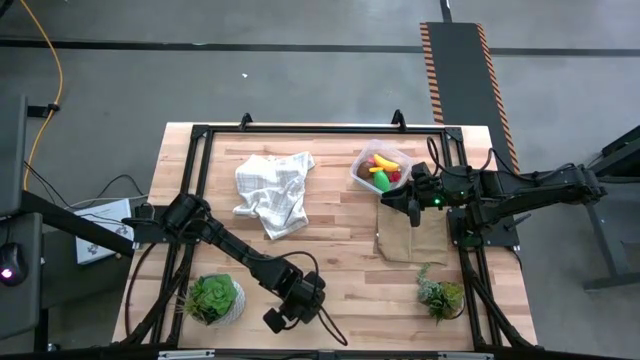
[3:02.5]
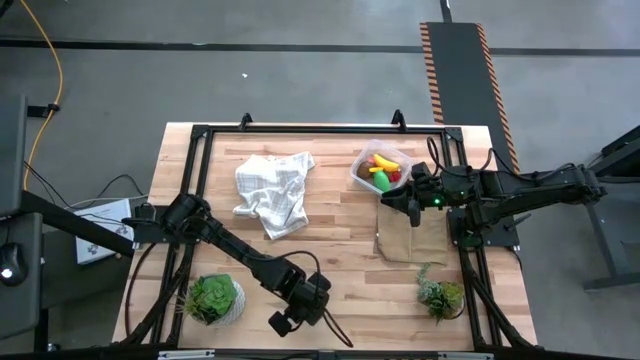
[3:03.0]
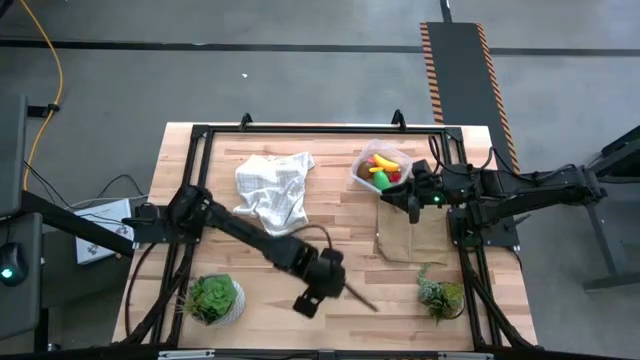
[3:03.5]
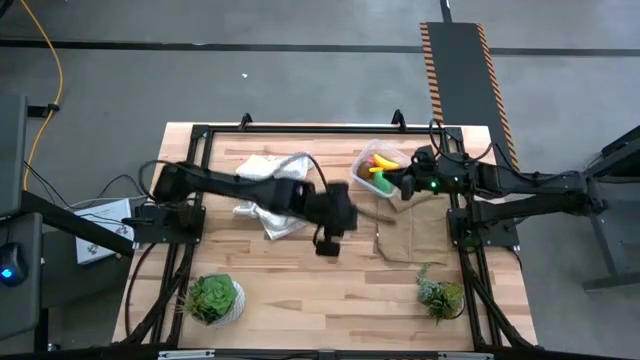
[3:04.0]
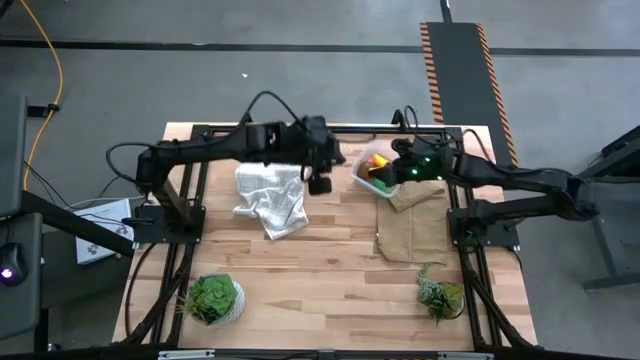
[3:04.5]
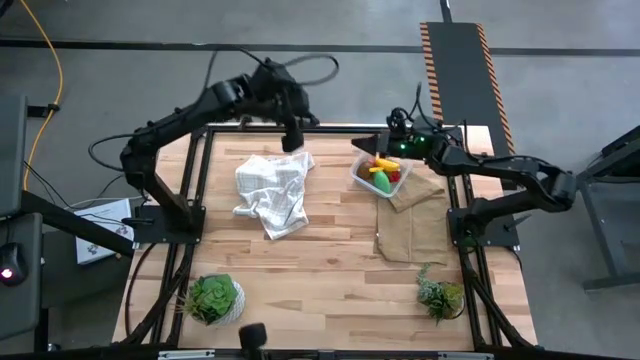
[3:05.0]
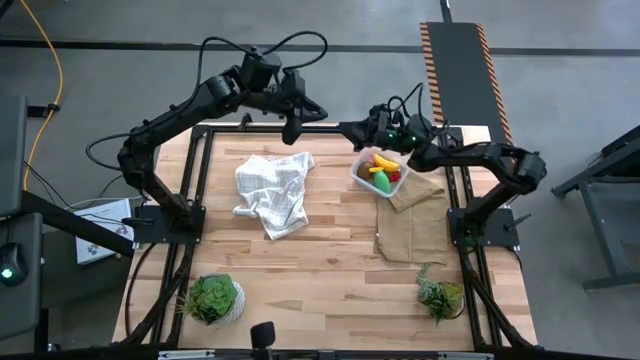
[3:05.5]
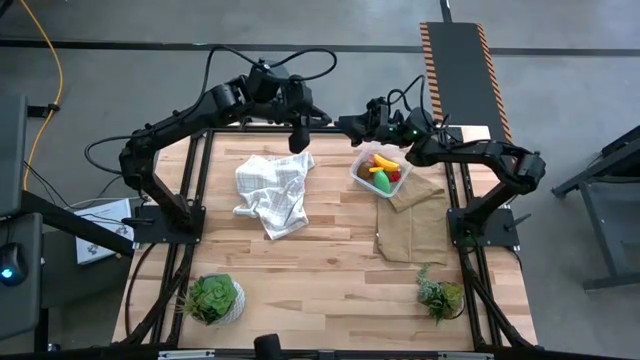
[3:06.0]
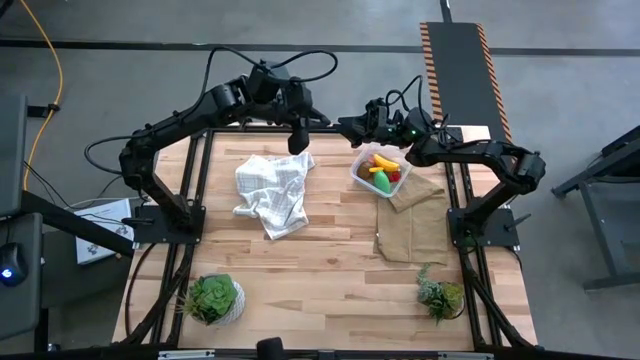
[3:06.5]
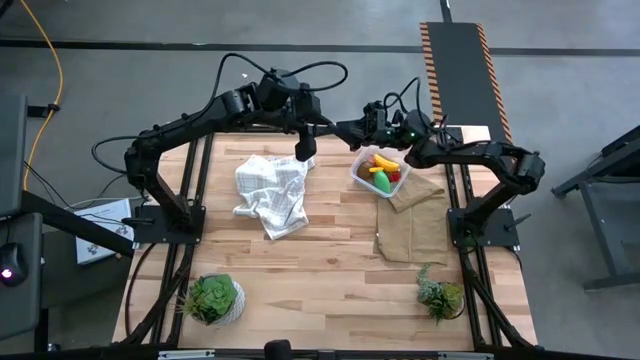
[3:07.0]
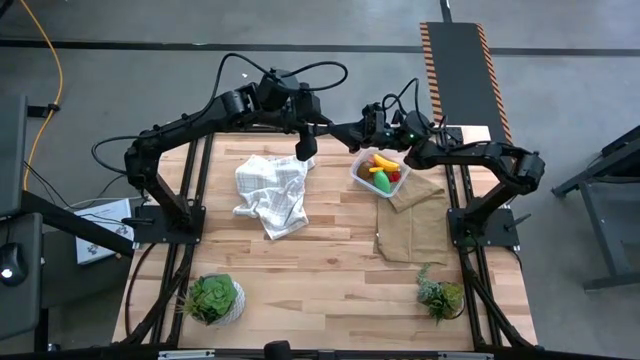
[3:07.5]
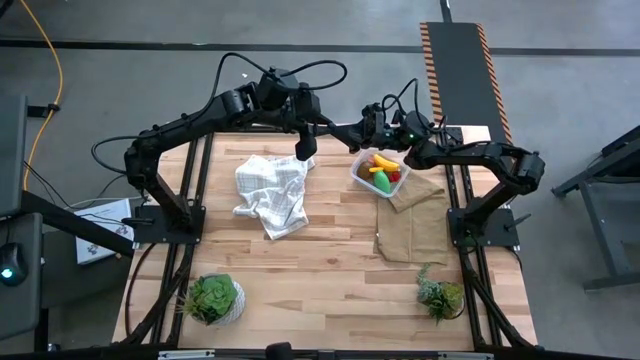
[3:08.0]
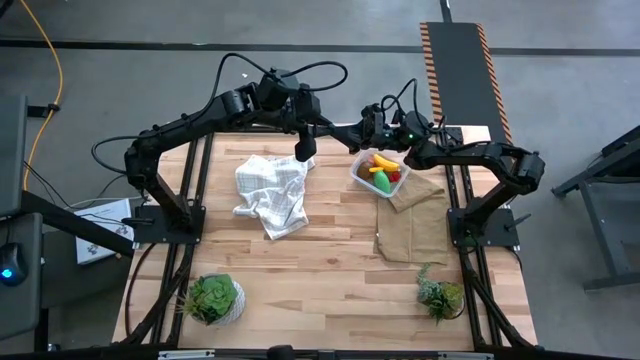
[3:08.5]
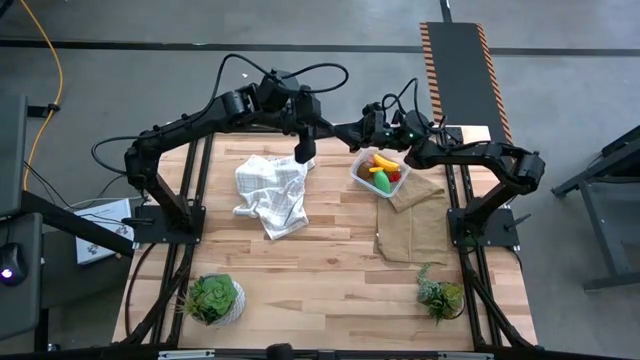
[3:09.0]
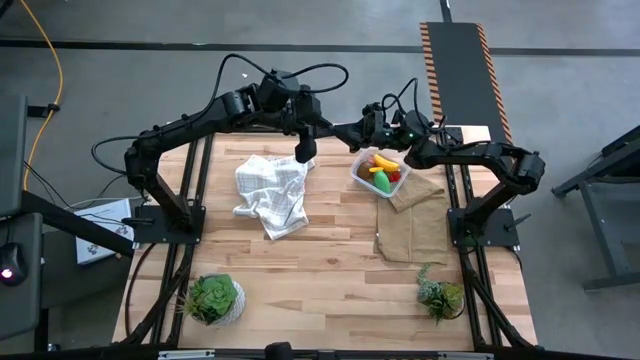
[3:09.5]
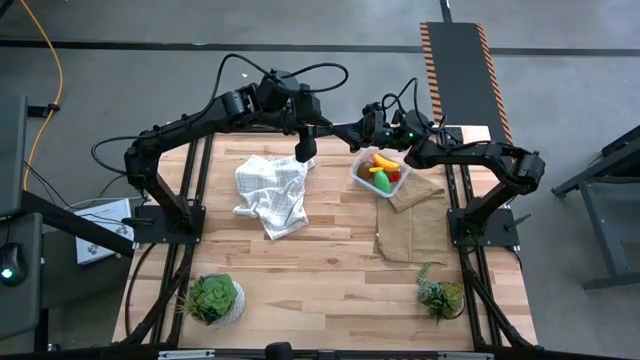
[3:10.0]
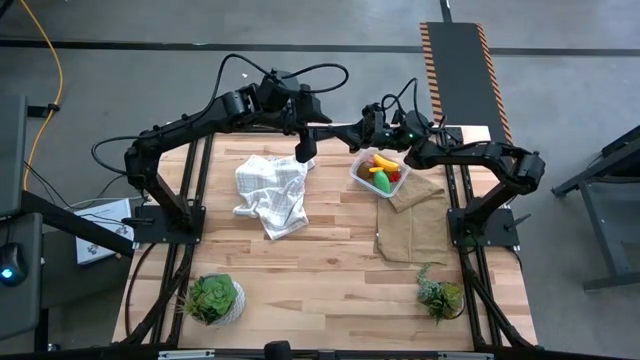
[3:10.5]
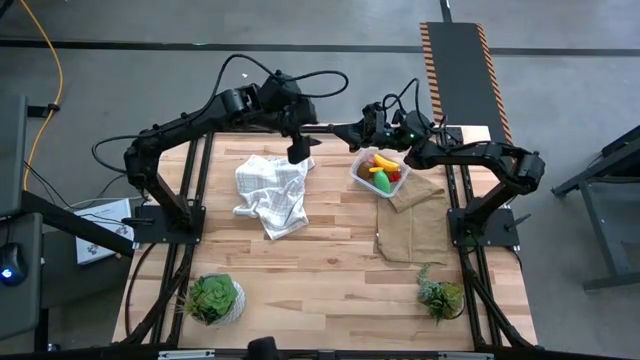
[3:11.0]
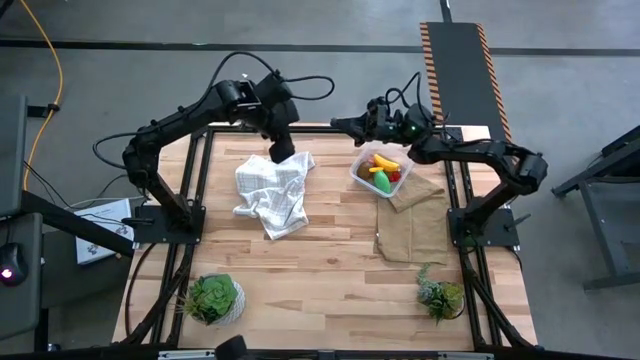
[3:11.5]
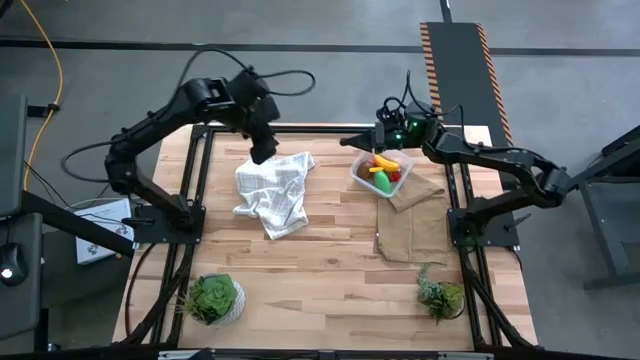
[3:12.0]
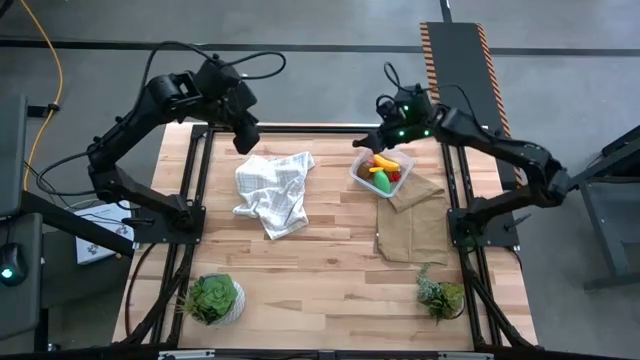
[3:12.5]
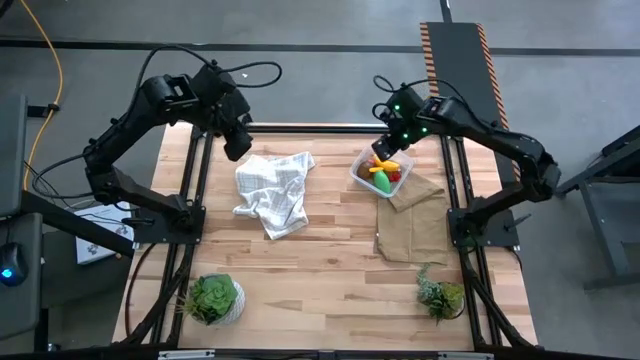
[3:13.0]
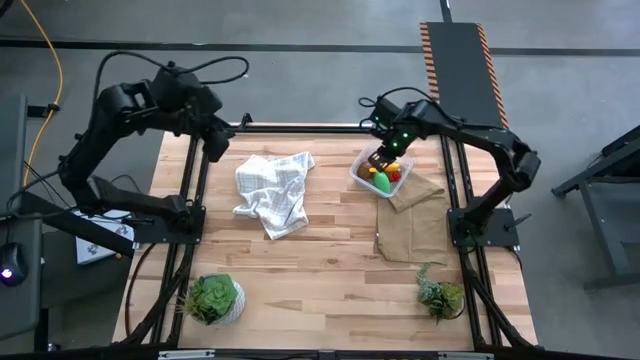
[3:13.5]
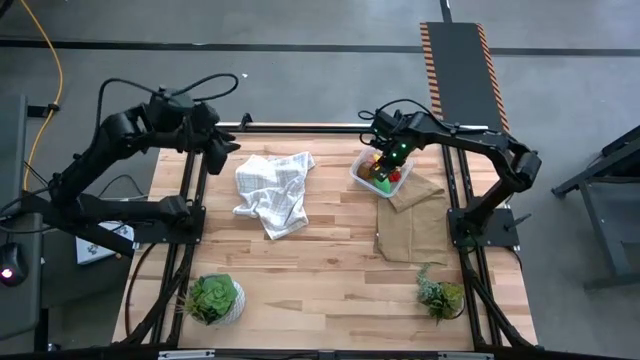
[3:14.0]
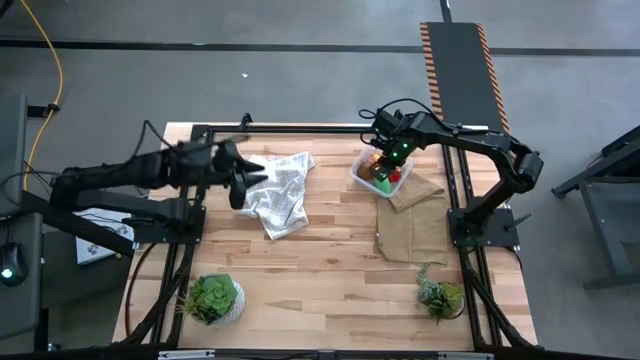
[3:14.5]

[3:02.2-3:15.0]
Task: Pick and placing Produce into tupperware
Put the blackberry into the transparent bin

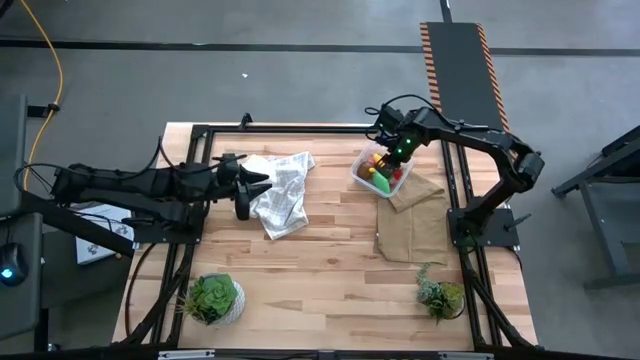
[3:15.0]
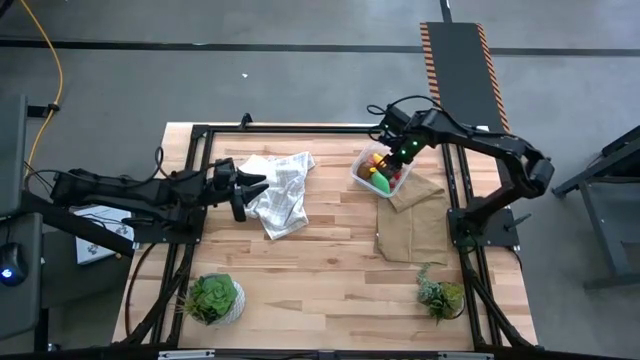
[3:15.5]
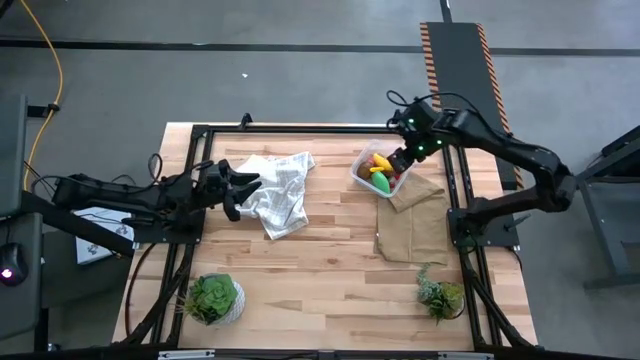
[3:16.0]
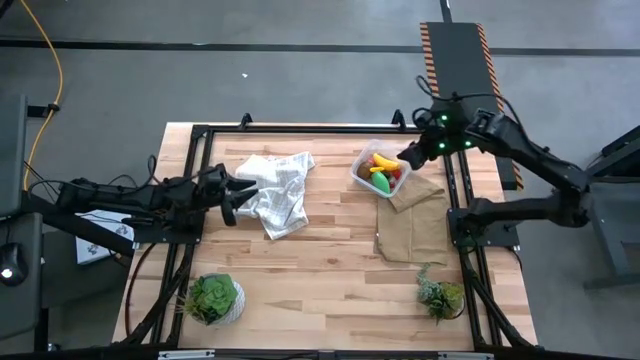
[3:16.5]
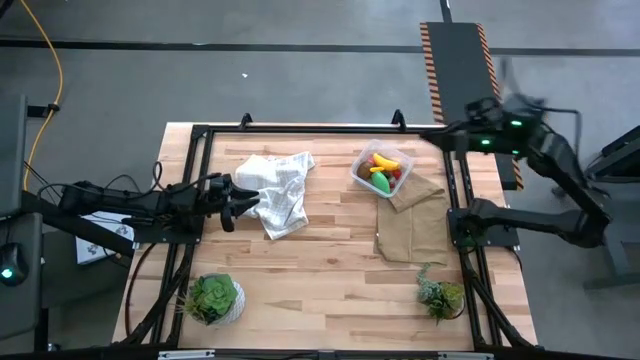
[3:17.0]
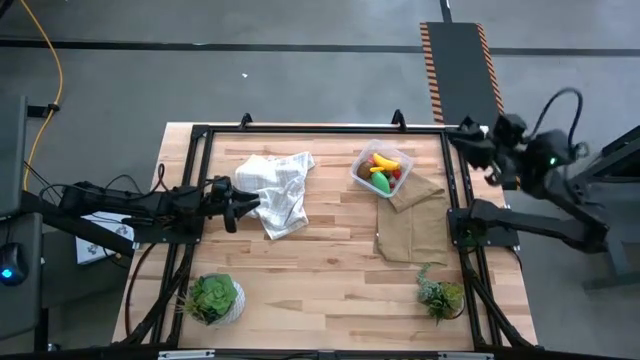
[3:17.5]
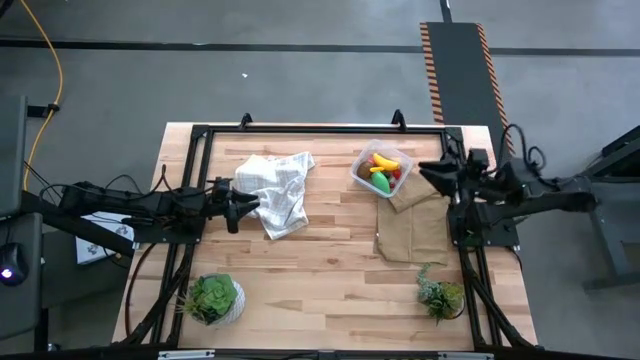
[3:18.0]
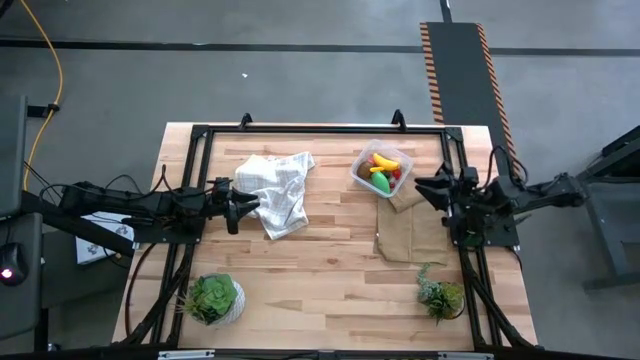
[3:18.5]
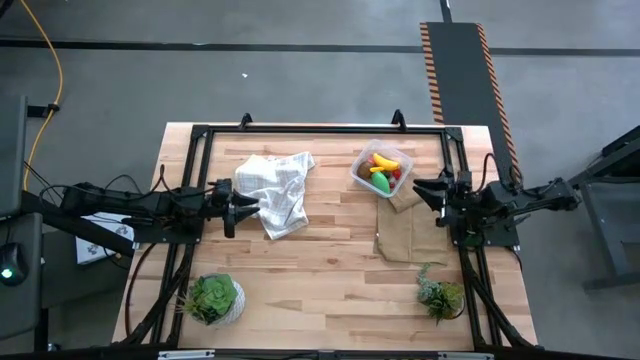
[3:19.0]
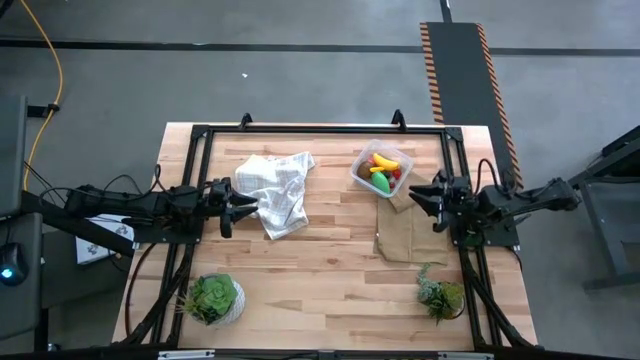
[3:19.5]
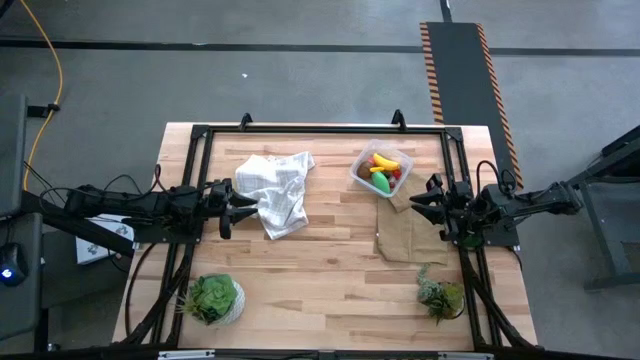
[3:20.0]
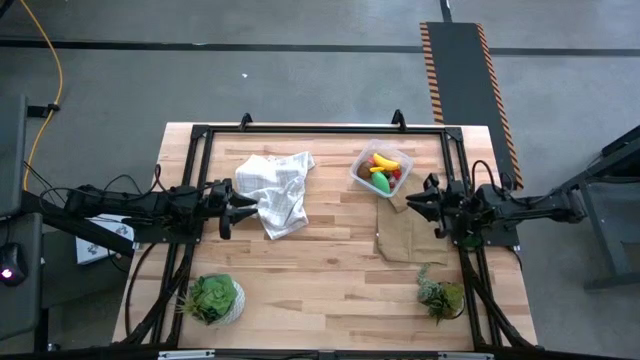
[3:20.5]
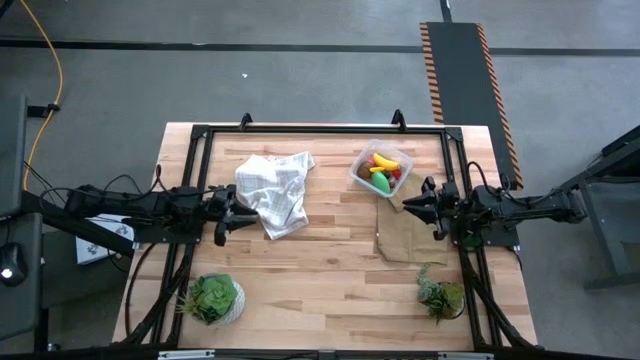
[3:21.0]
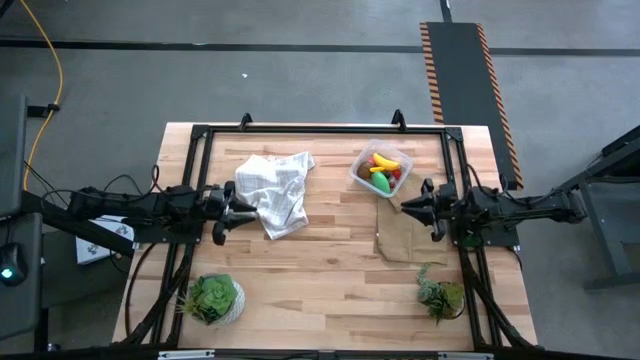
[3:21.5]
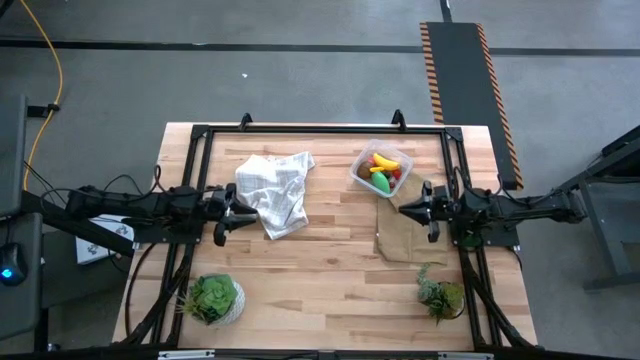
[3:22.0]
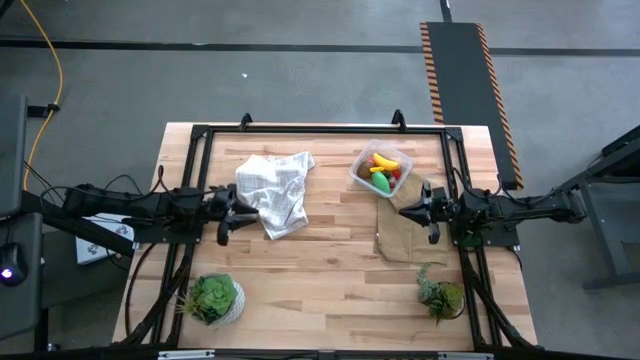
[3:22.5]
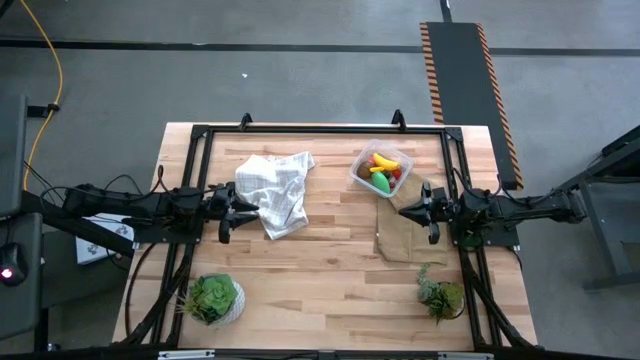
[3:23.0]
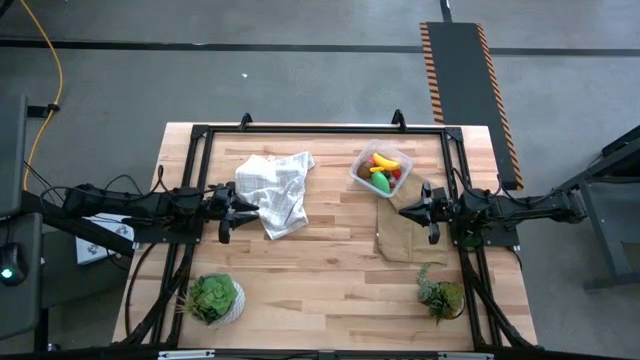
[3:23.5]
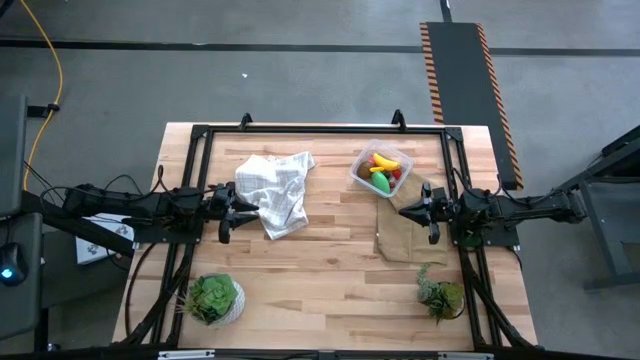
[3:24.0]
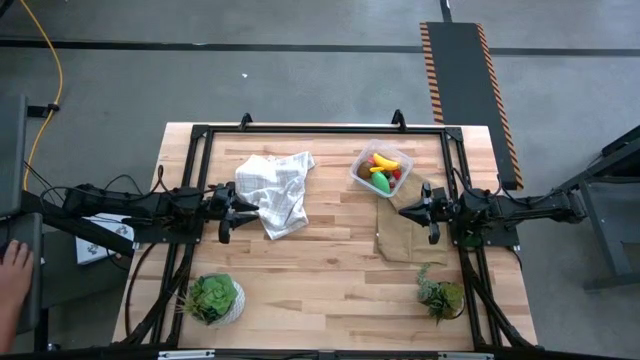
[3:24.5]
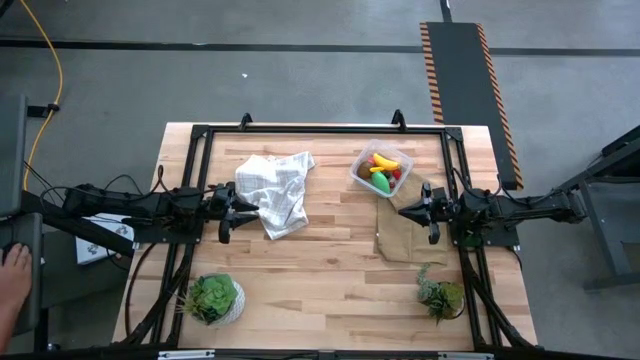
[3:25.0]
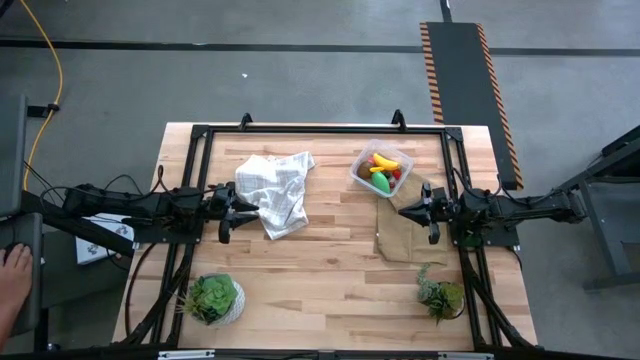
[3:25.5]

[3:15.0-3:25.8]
Return to Home Position
